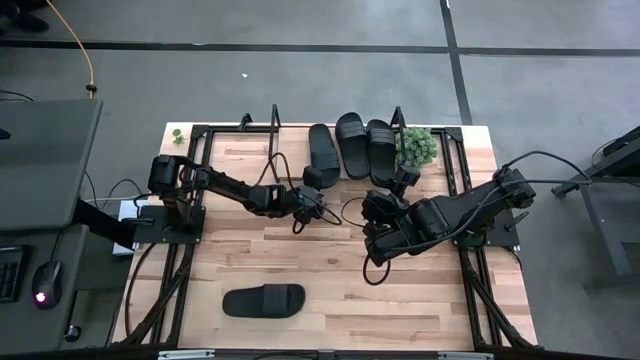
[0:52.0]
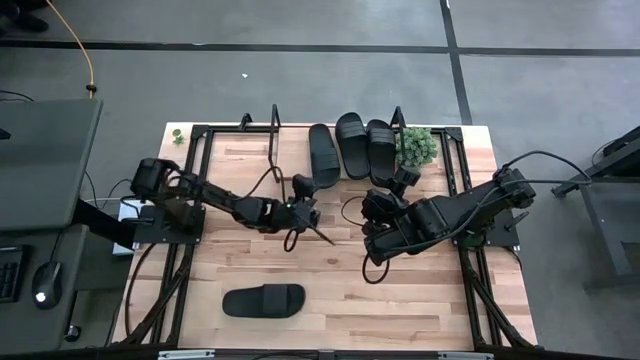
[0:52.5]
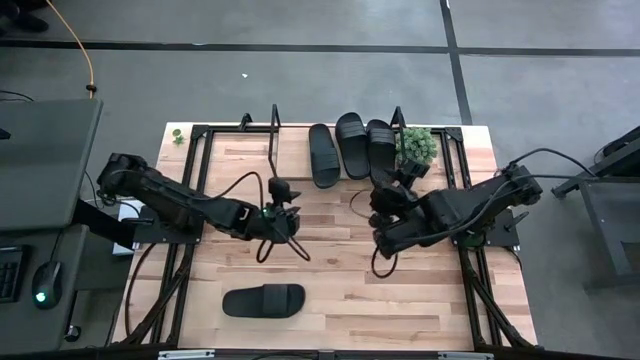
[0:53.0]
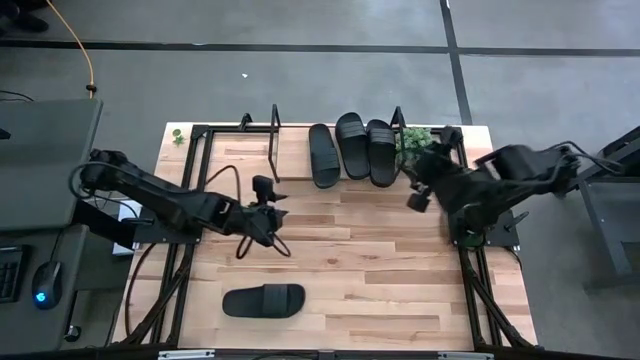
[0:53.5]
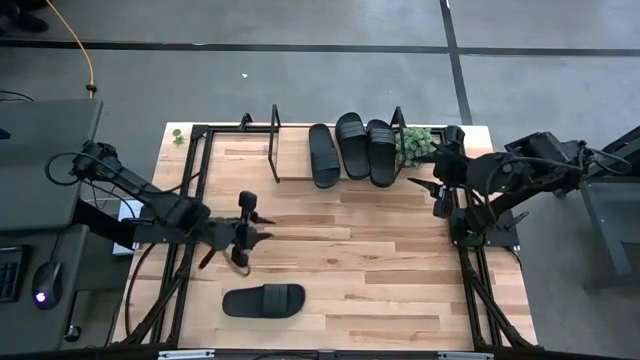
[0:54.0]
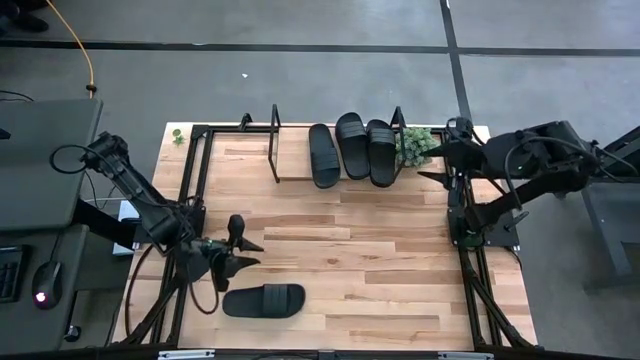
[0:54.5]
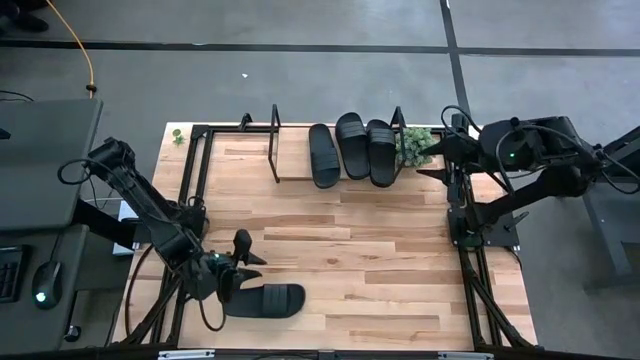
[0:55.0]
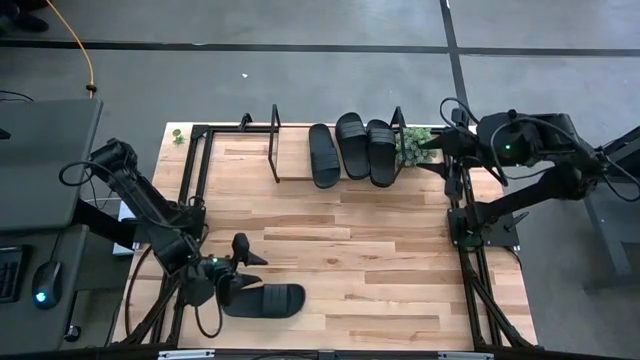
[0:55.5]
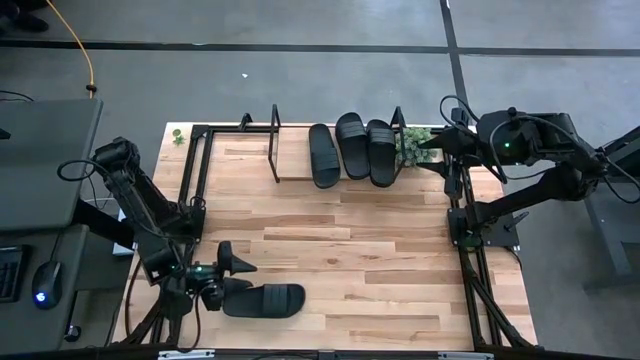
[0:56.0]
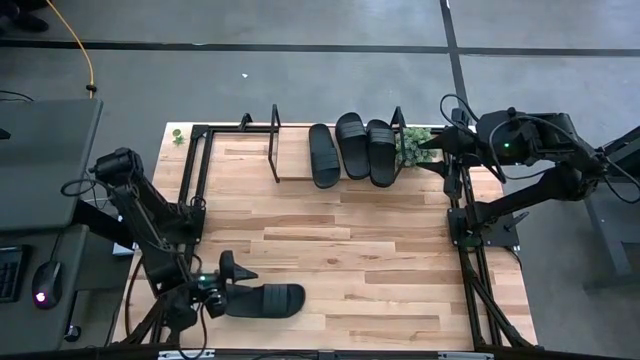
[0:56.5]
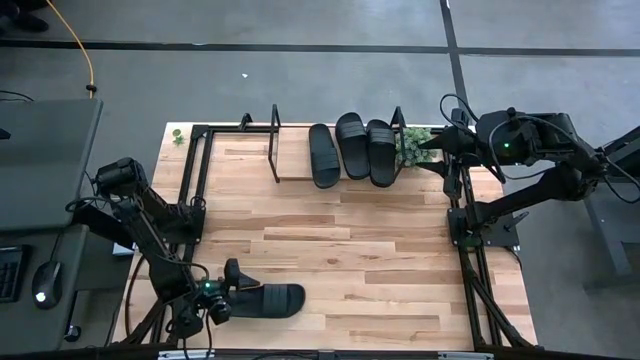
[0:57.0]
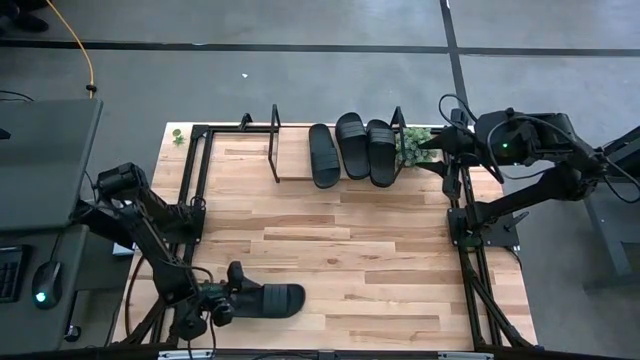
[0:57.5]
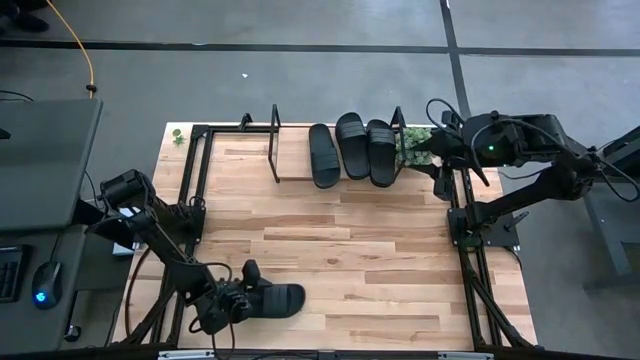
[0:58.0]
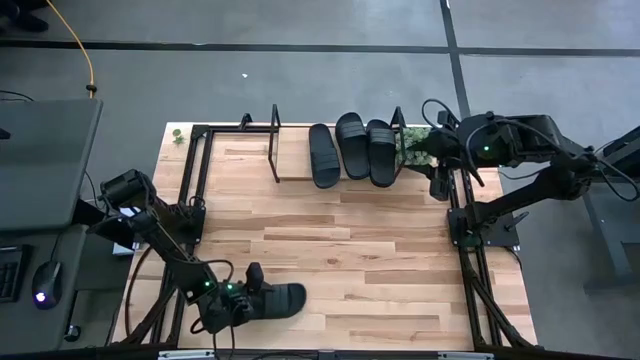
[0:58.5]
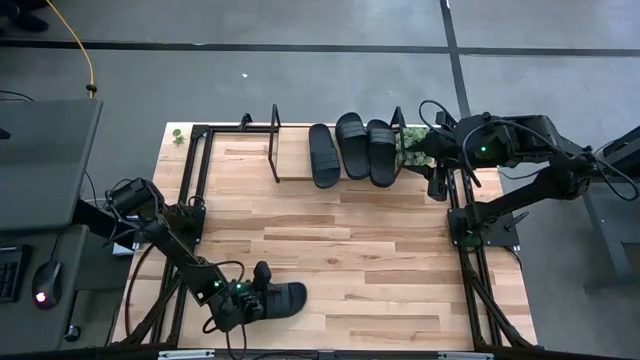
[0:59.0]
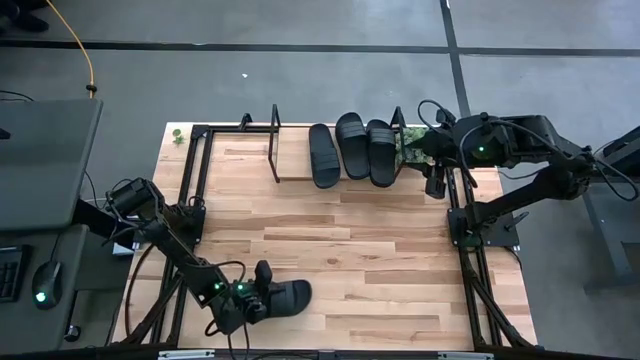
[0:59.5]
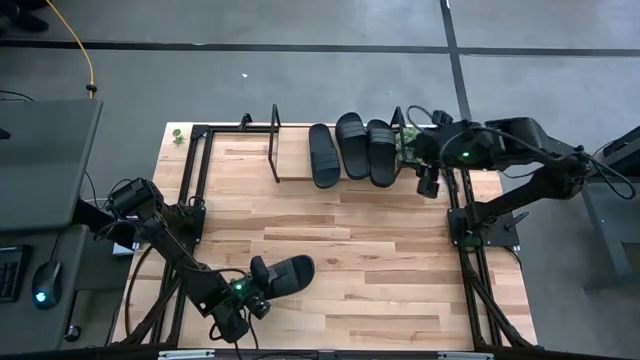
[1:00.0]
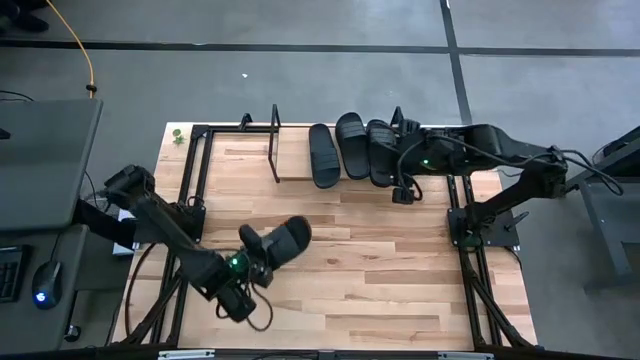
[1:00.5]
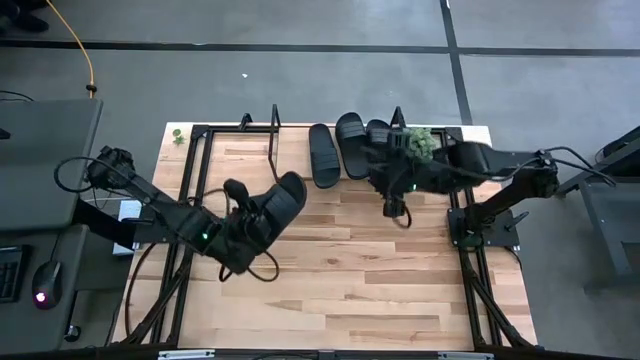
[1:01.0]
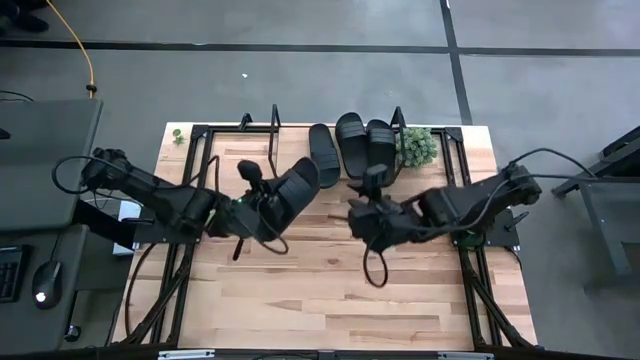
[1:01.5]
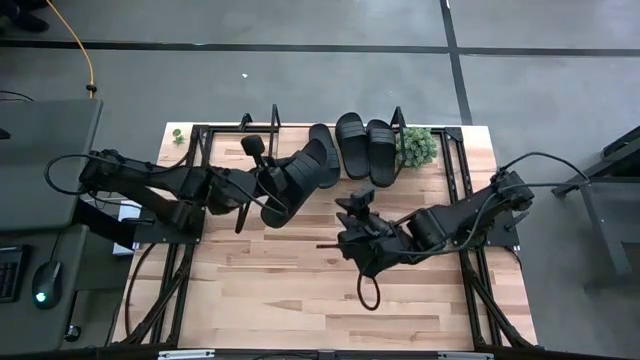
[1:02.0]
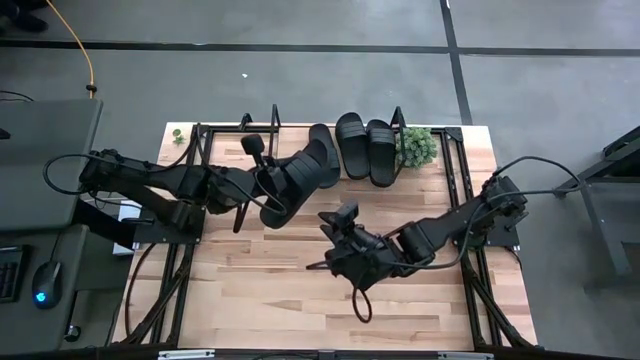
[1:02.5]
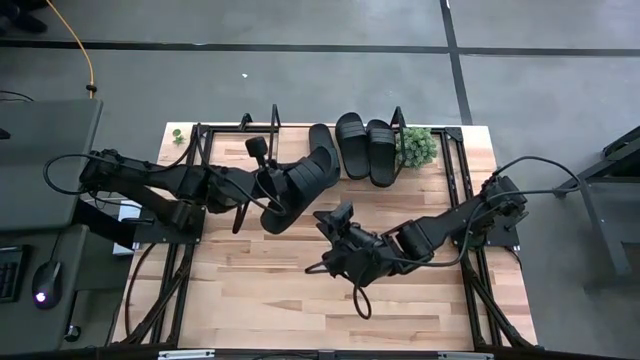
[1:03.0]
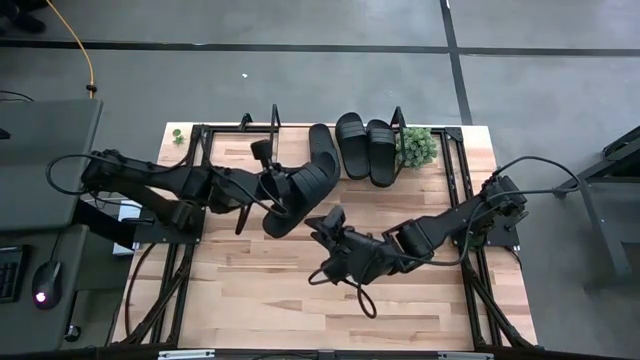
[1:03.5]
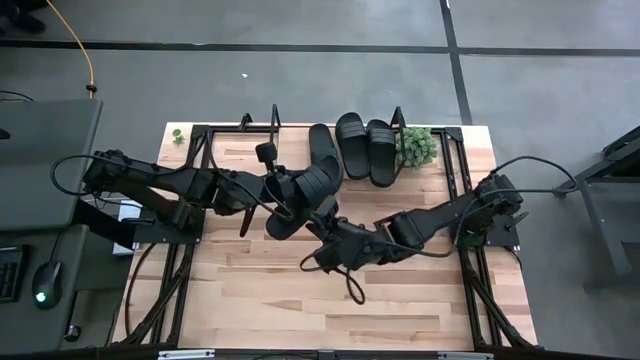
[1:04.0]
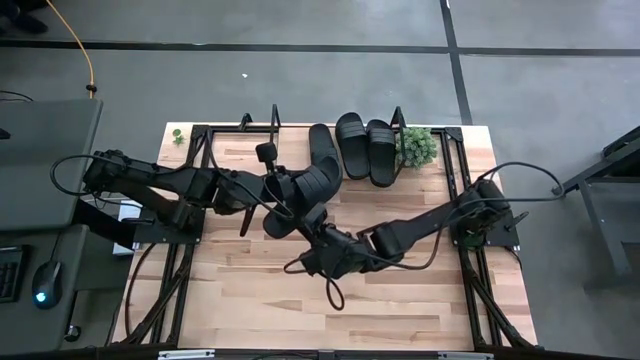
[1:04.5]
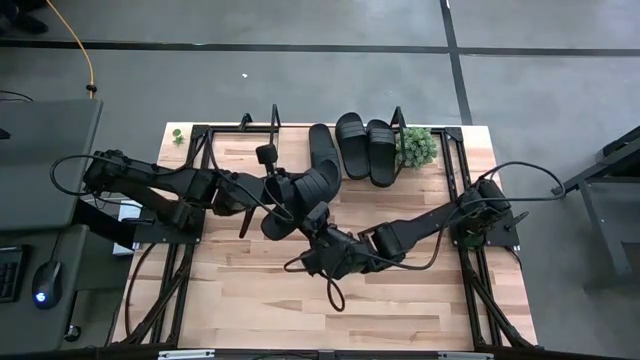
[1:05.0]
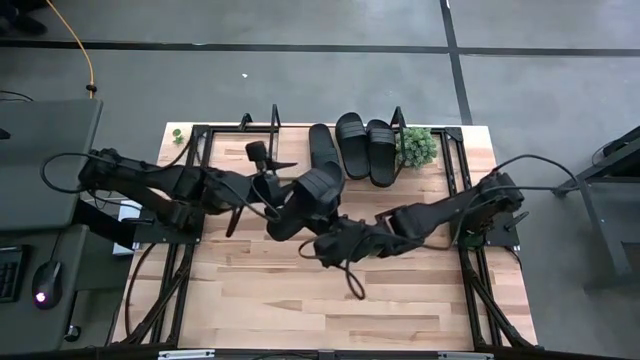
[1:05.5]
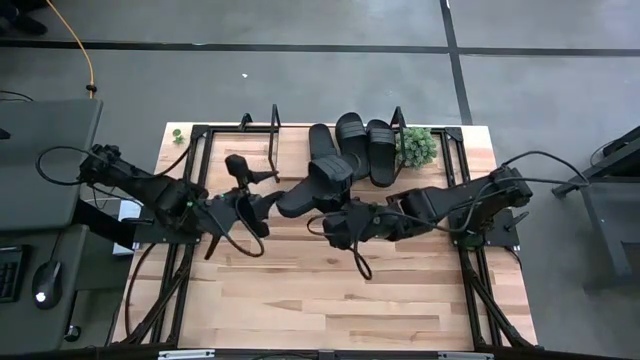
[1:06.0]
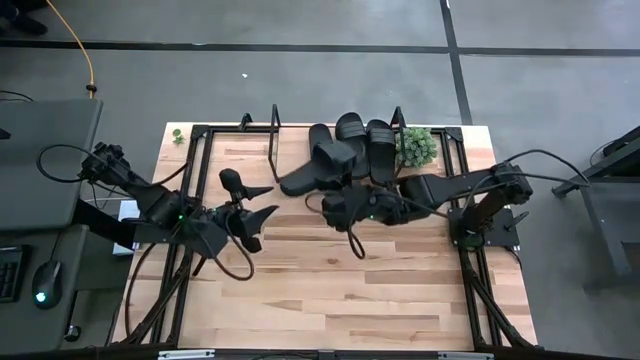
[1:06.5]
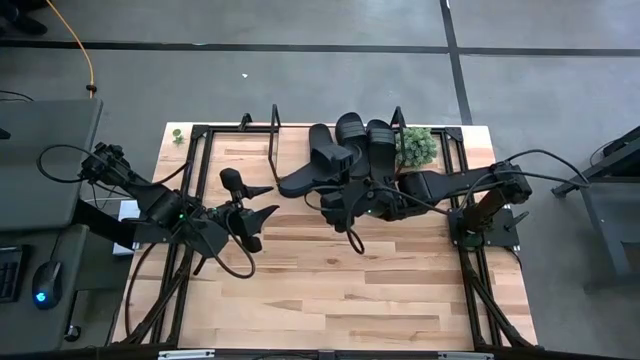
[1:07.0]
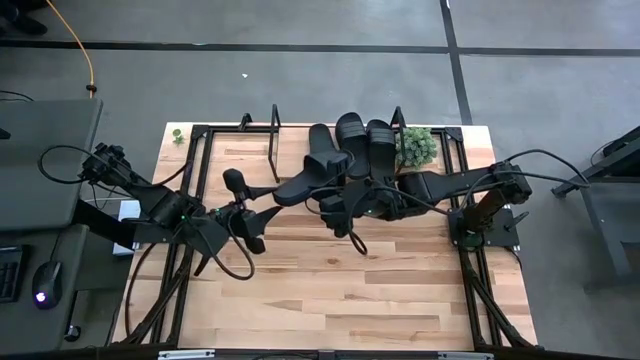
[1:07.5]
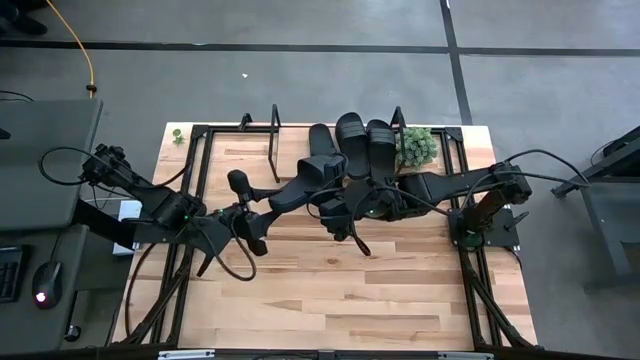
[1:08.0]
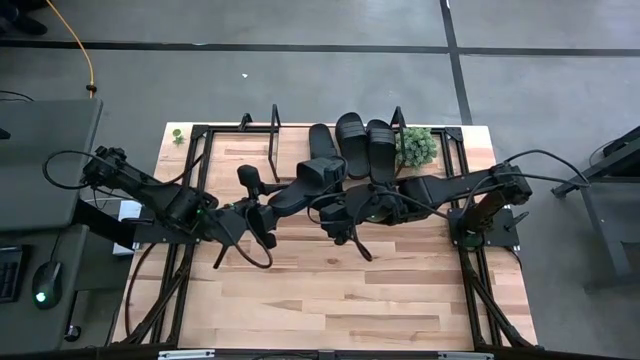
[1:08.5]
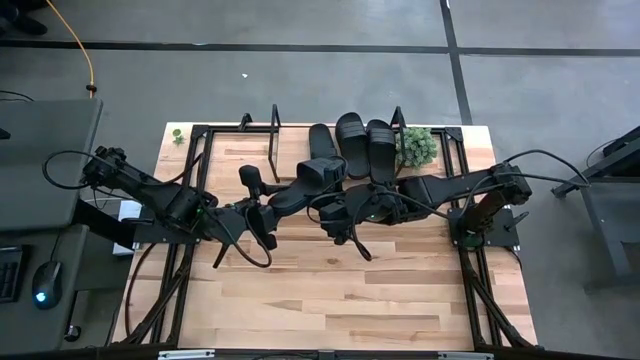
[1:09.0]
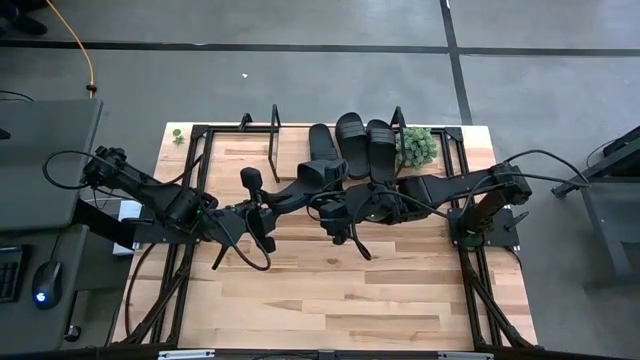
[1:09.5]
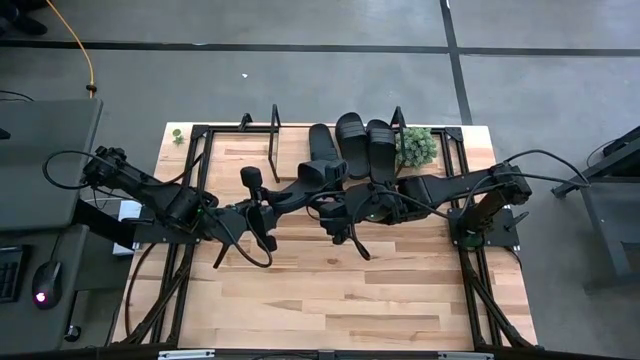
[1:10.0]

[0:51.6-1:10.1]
Task: Pick and place slides into the shelf
Put the black slipper on the shelf
